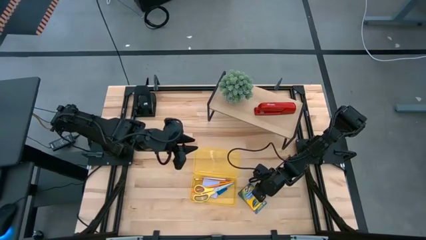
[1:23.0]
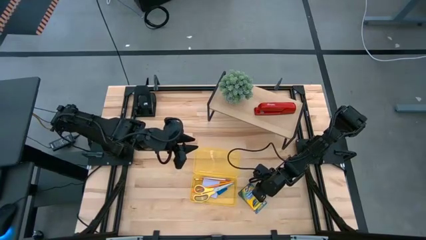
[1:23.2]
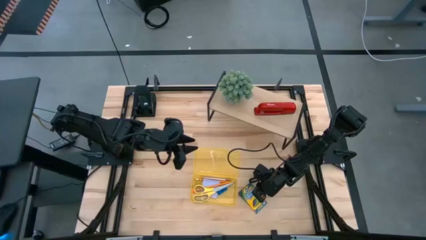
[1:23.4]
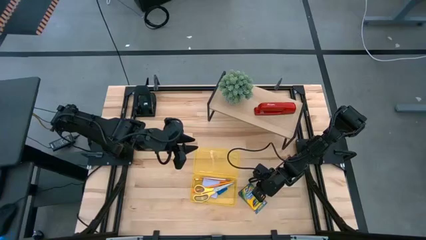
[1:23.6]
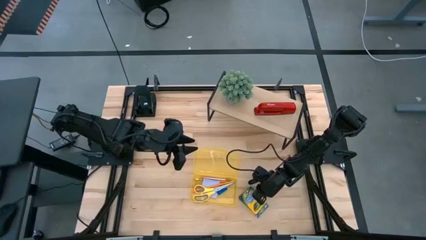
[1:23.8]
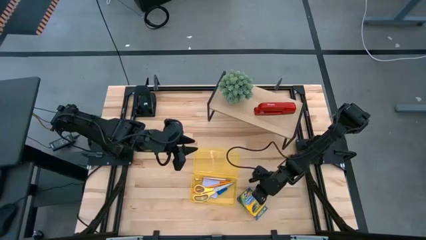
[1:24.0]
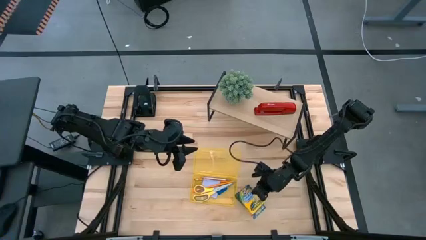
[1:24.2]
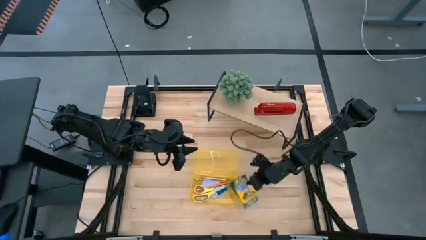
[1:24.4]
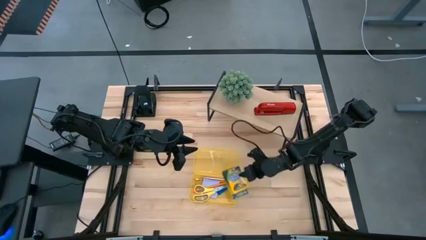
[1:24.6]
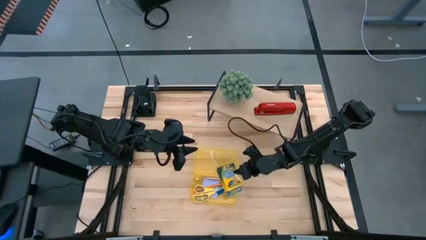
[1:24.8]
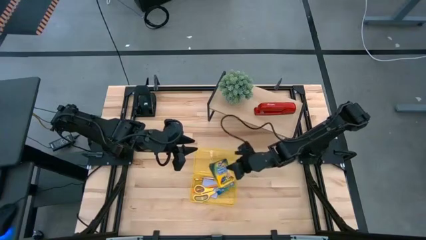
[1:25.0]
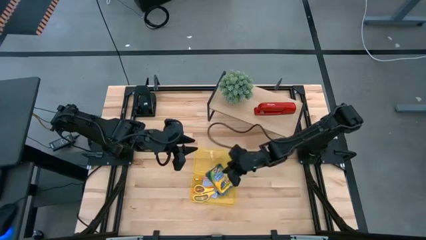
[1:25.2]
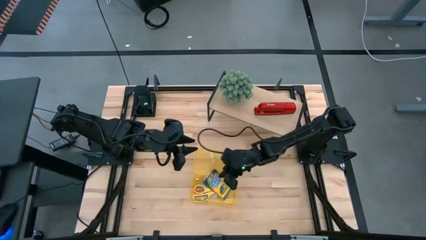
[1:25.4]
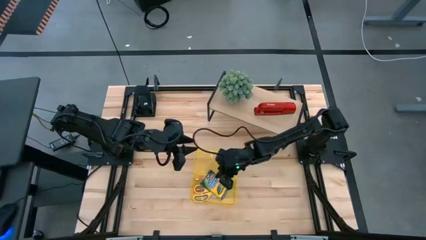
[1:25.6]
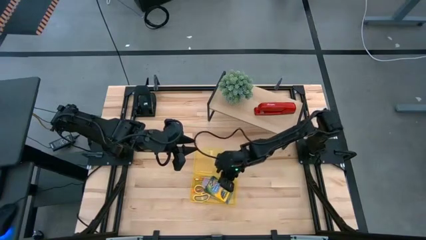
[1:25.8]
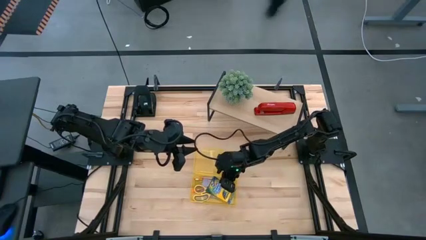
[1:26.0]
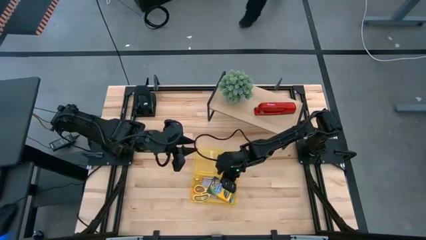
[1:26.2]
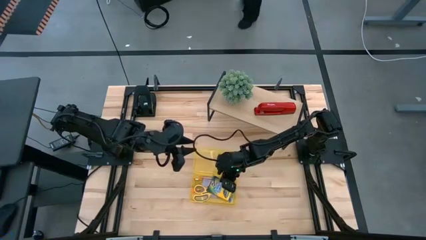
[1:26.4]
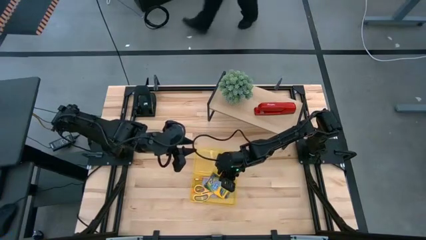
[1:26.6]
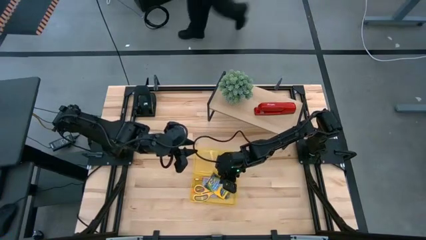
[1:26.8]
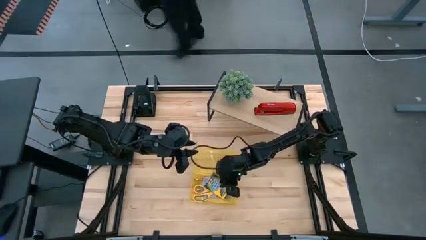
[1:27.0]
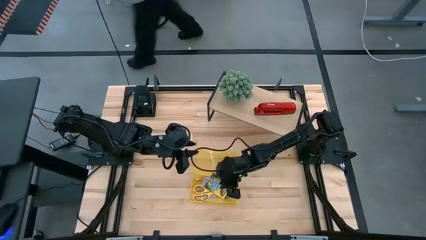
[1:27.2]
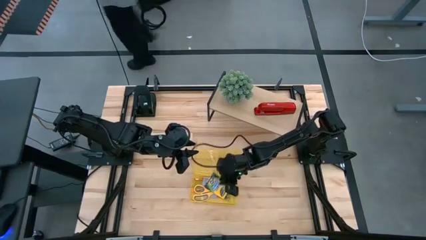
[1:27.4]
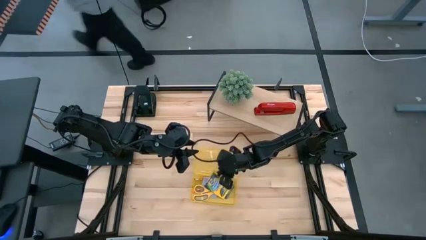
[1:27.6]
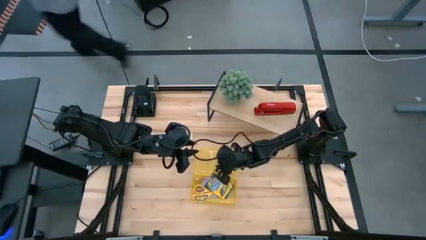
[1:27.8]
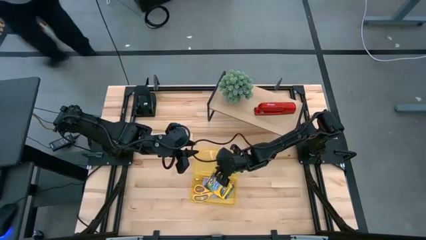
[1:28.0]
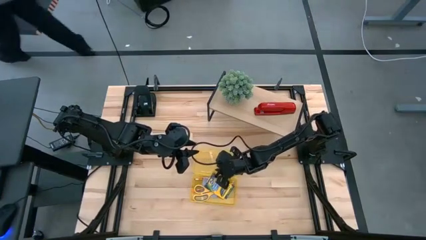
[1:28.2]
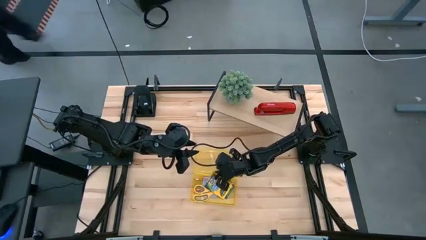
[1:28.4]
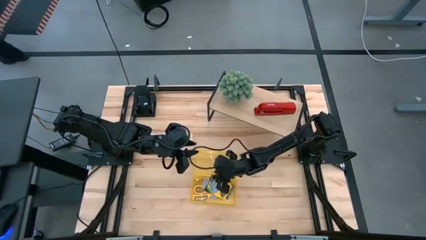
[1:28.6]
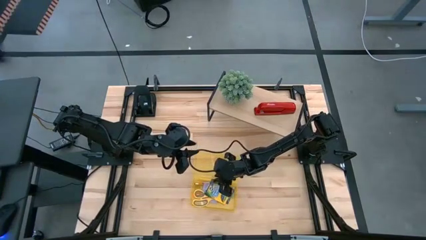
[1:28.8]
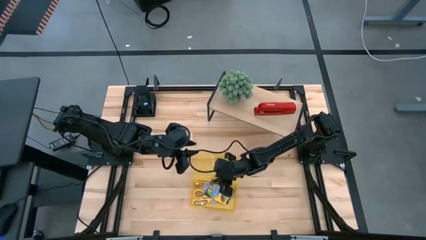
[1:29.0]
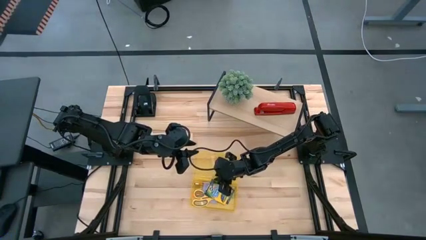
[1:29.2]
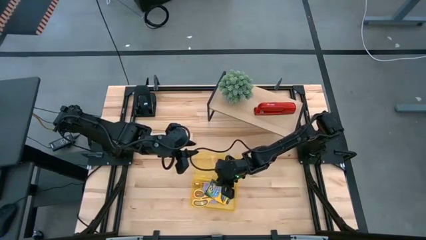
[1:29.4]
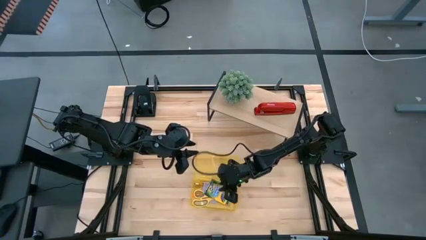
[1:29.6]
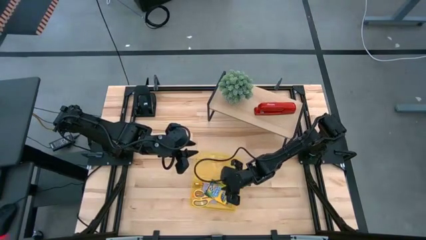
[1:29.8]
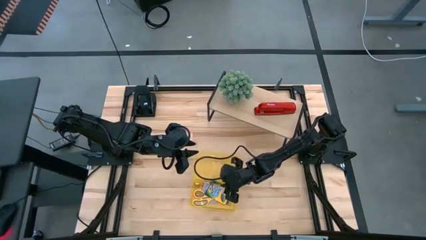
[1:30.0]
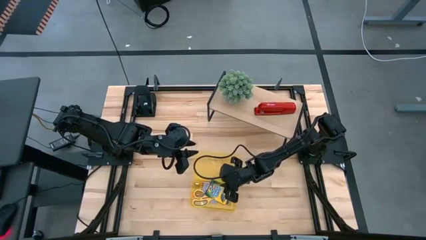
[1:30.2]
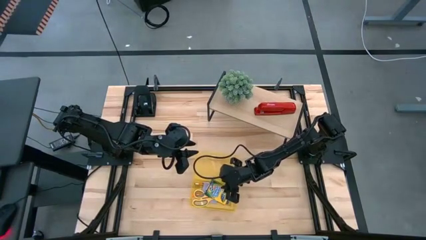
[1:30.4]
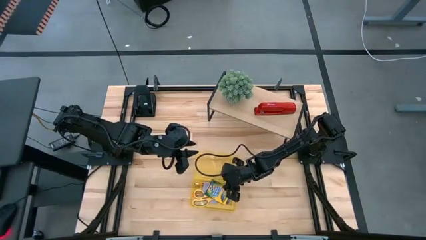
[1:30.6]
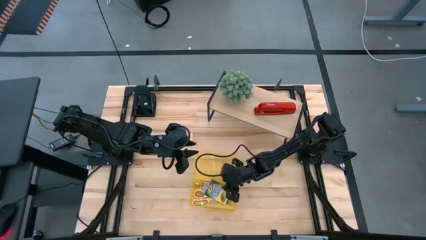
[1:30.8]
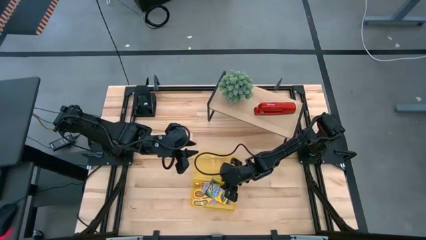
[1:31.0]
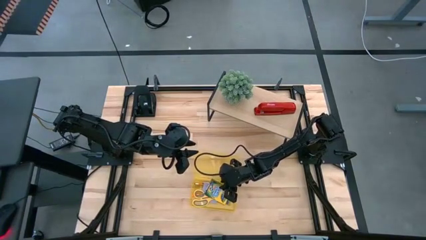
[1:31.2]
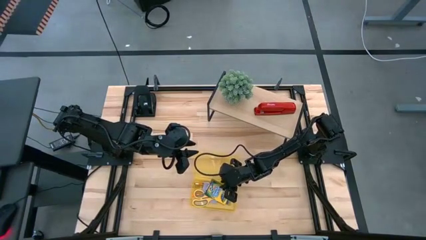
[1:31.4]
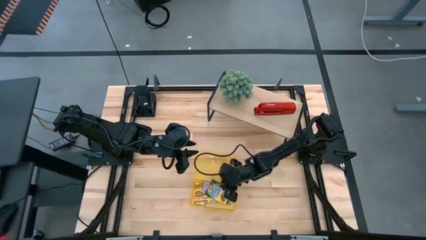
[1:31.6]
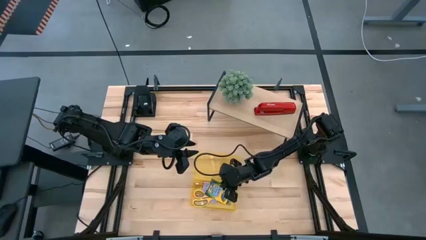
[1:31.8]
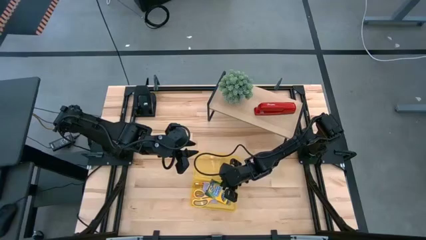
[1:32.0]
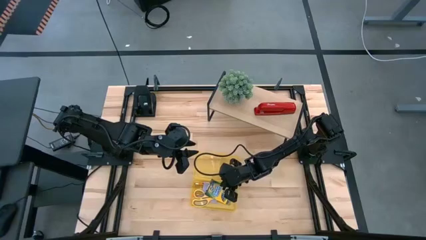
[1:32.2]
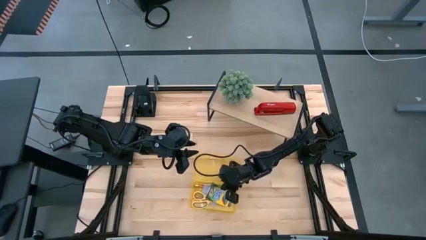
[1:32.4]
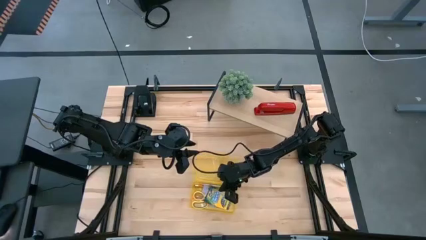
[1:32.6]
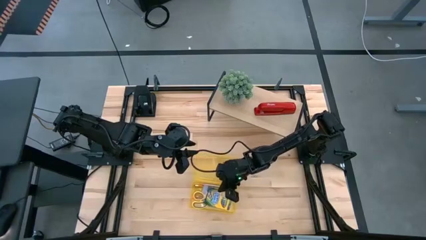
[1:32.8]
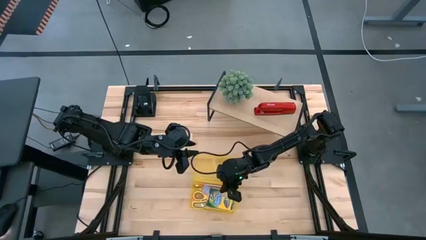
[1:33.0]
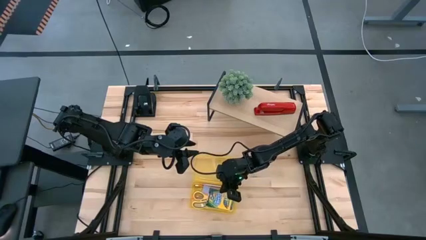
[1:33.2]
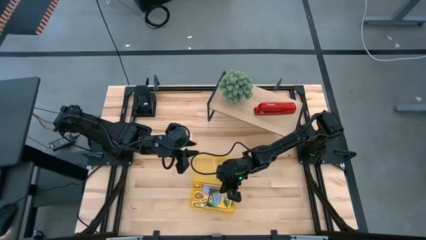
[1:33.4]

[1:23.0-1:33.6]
Task: Pack school essentials
Put the crayon box into the supply box
